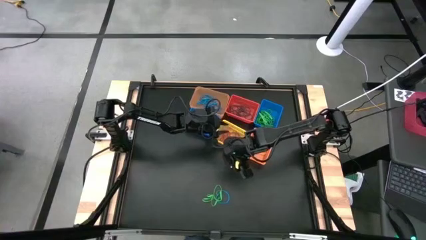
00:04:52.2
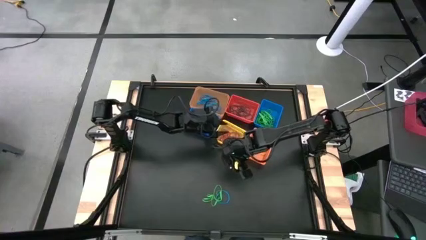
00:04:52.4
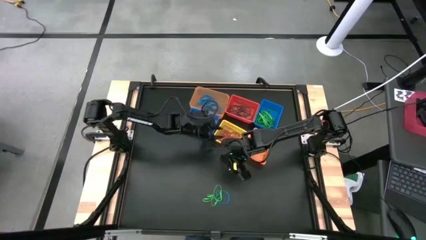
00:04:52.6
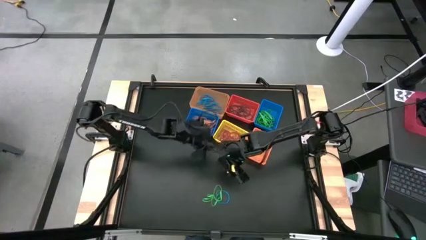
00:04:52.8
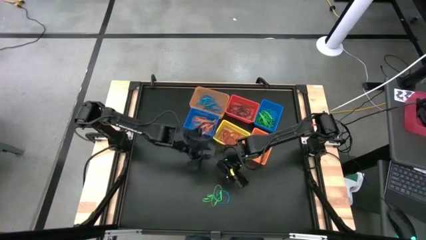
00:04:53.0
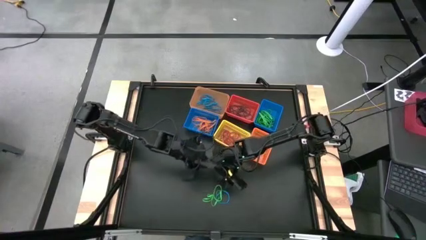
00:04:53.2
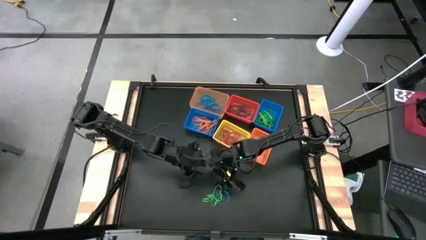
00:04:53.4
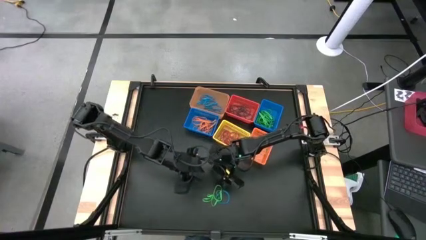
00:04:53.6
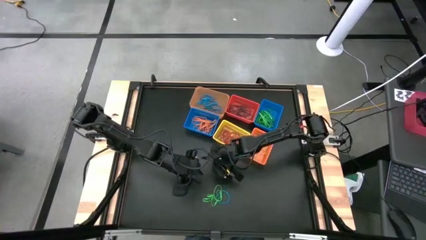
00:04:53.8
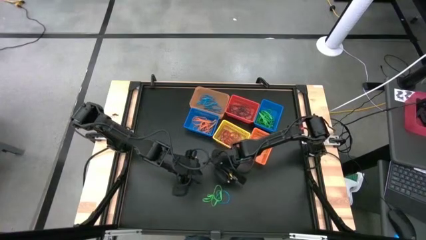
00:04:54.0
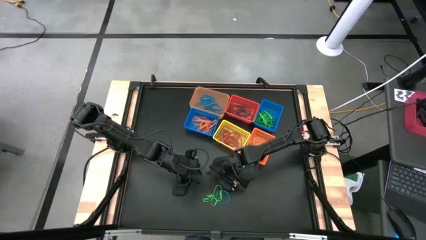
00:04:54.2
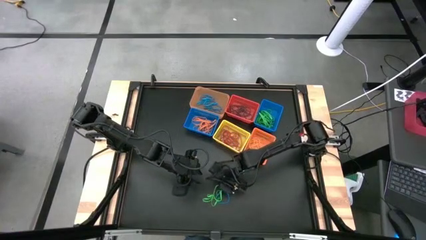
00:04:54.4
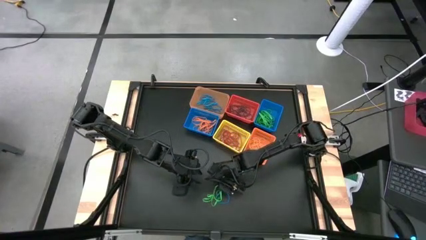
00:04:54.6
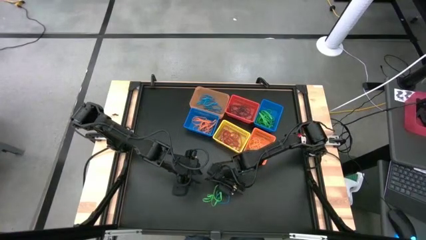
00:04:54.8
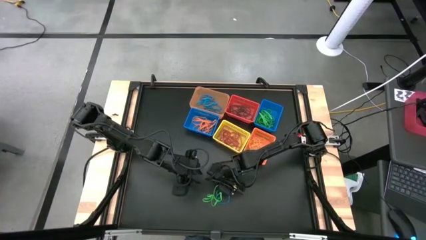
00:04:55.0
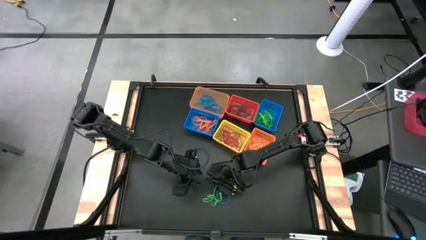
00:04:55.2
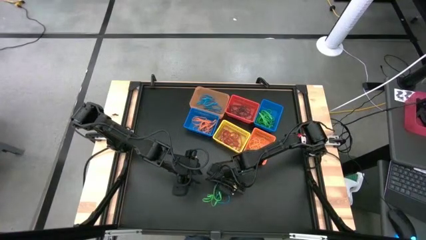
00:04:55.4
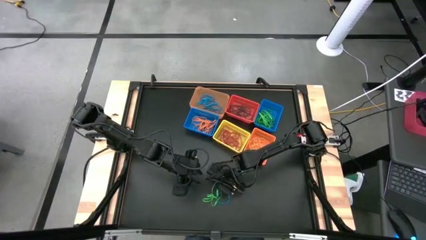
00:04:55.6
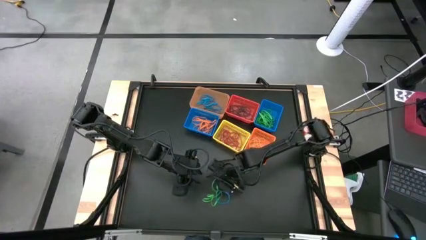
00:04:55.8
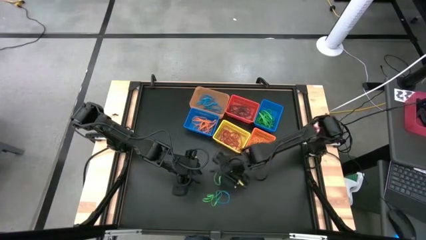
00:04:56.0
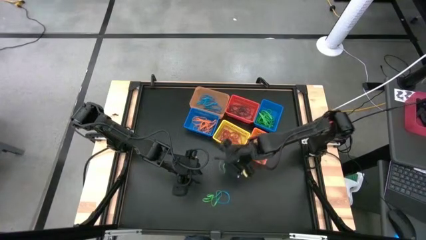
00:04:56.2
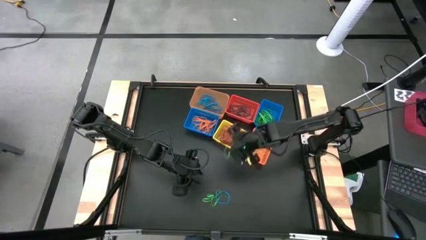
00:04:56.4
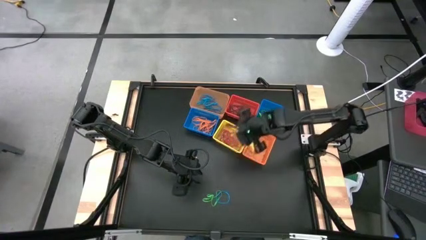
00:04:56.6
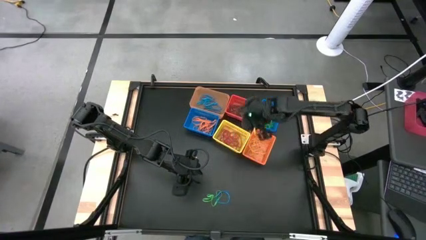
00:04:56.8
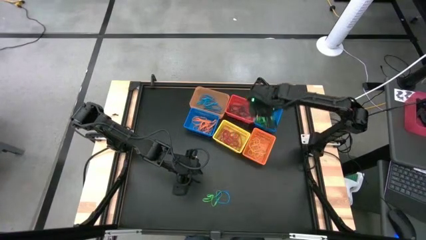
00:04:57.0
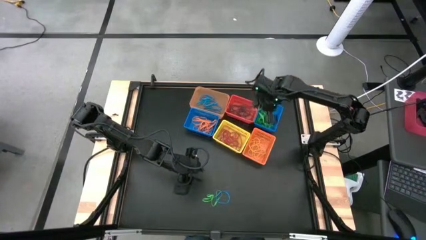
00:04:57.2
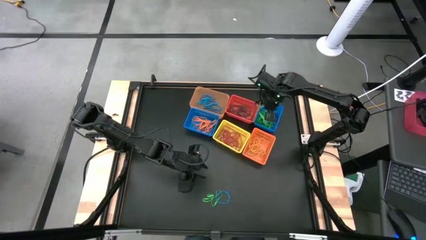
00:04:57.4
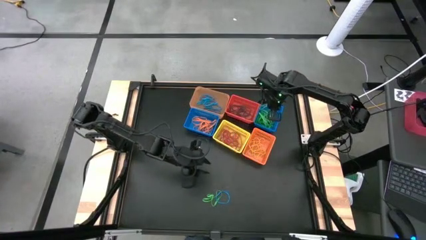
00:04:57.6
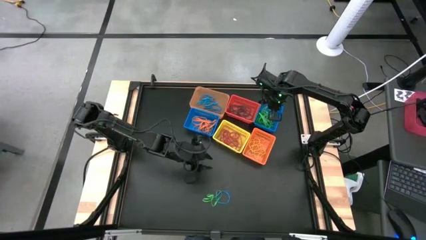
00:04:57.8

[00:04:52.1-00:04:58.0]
Task: Sort rubber bands into baskets
Put the green rubber band into the right blue basket

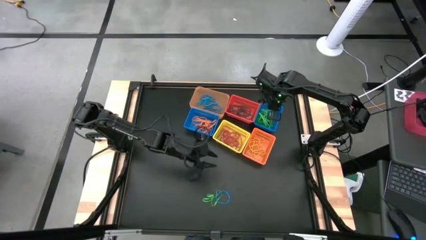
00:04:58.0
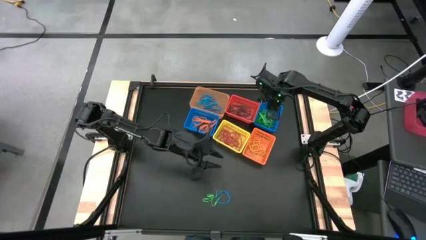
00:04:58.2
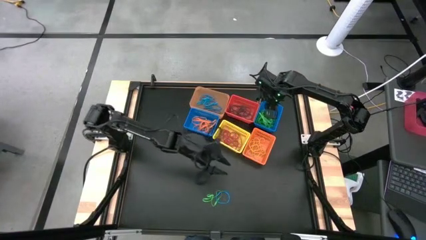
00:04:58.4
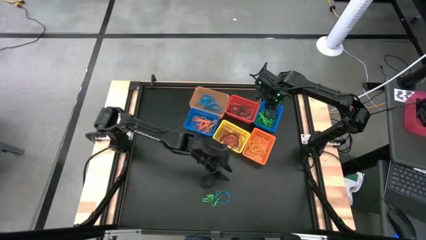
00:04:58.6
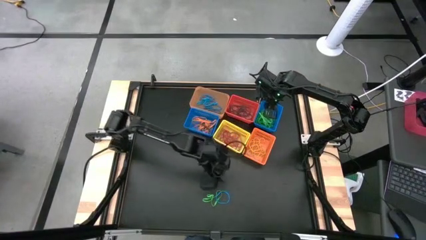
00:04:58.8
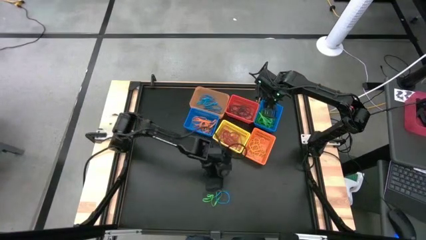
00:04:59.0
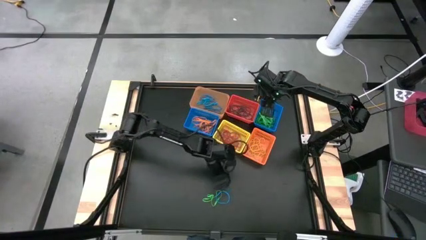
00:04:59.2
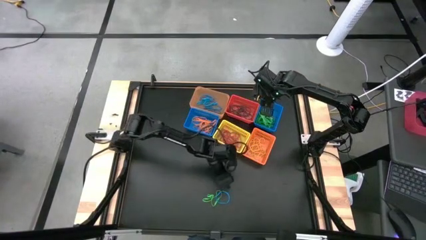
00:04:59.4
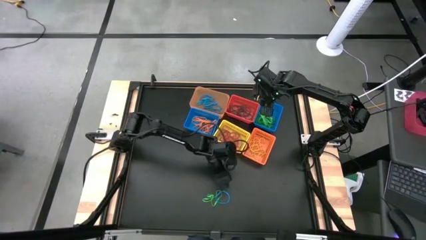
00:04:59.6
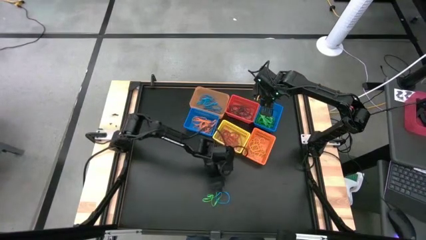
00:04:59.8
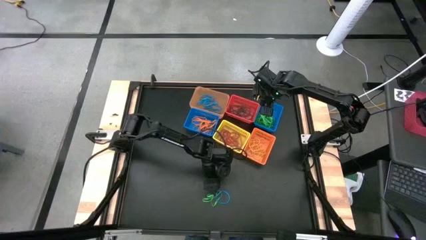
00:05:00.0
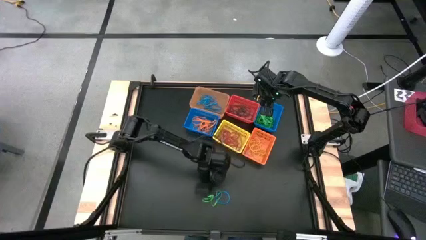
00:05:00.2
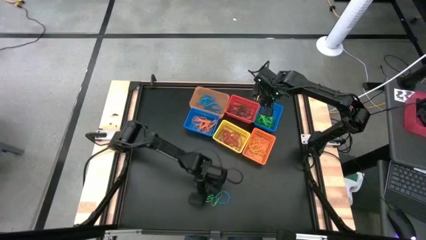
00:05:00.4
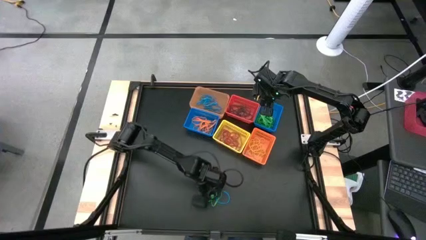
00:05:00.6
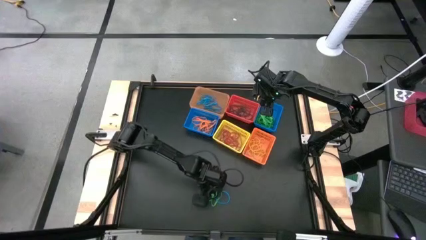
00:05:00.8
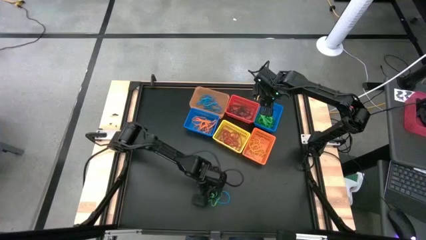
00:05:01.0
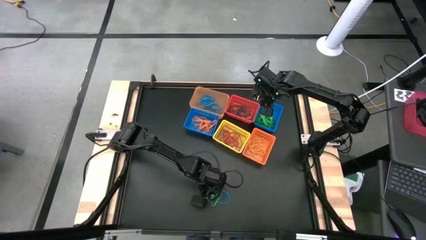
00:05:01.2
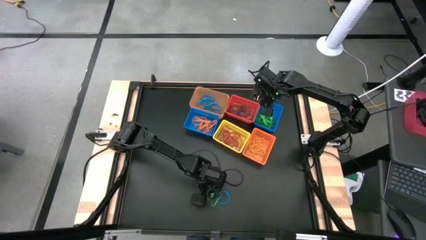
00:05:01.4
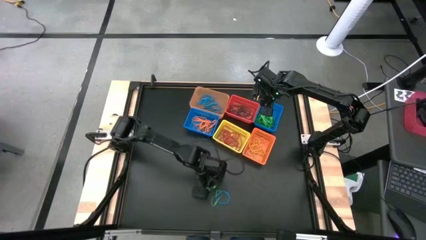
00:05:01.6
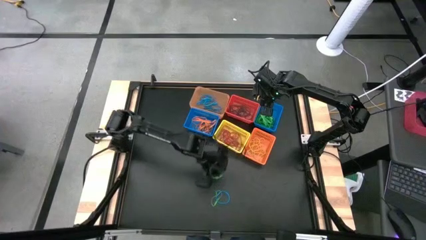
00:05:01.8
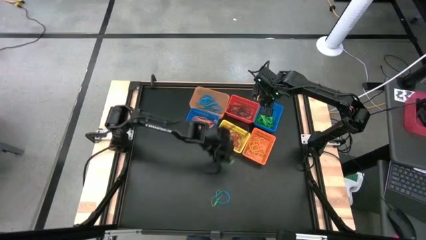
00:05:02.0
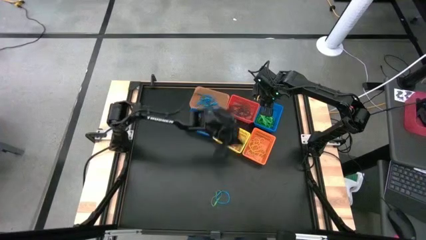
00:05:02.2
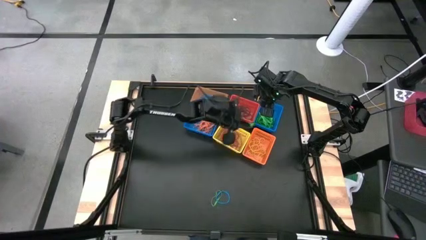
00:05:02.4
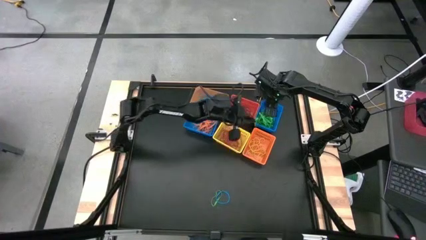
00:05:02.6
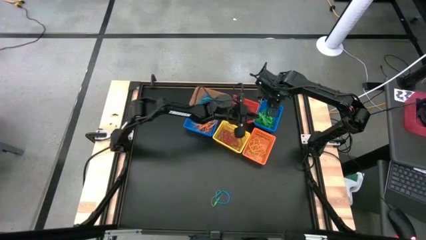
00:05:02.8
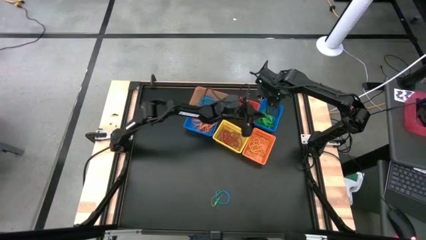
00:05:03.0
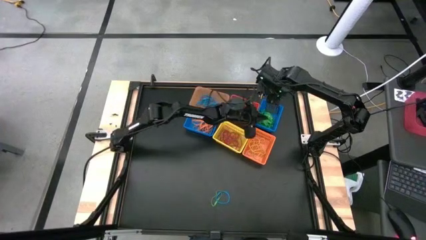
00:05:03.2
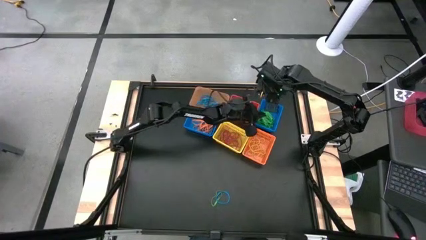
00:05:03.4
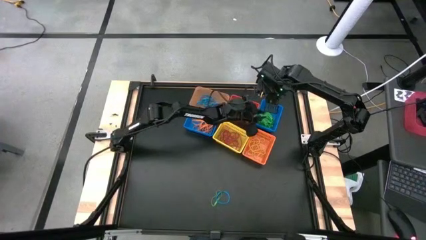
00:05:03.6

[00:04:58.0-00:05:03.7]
Put the green rubber band into the right blue basket

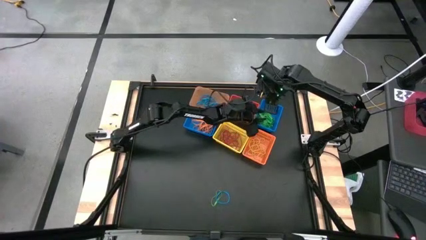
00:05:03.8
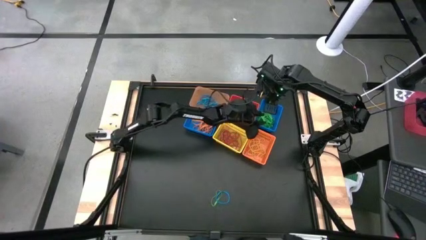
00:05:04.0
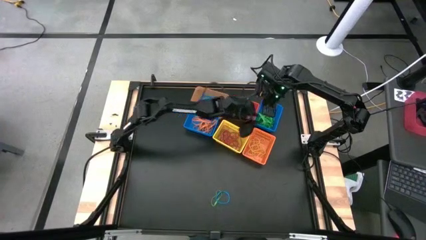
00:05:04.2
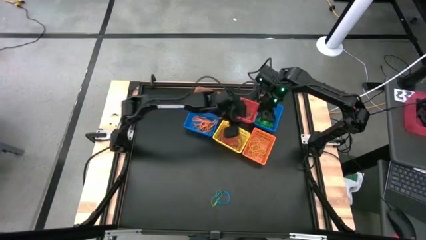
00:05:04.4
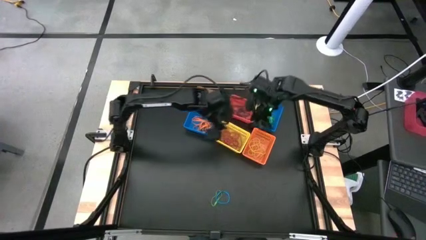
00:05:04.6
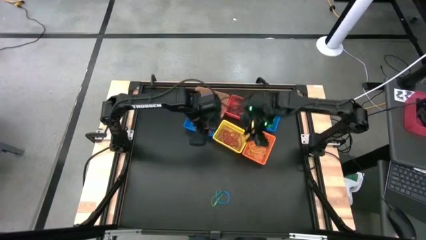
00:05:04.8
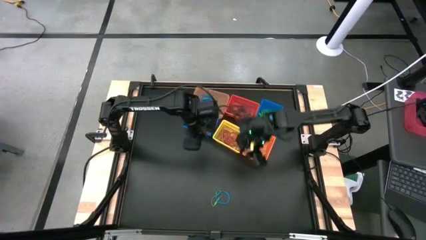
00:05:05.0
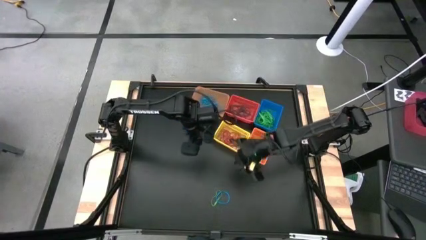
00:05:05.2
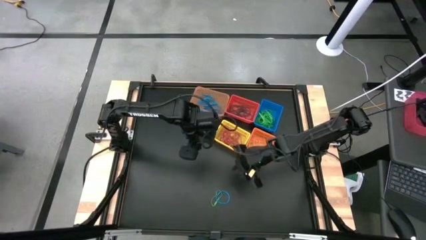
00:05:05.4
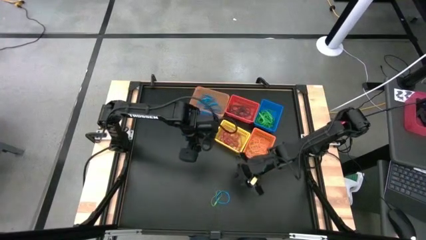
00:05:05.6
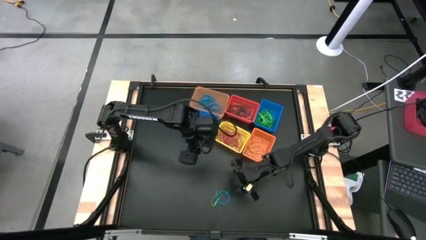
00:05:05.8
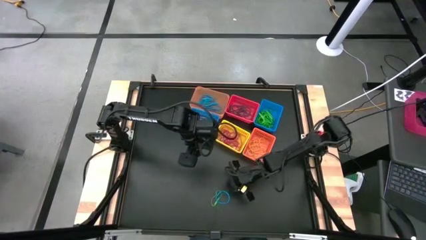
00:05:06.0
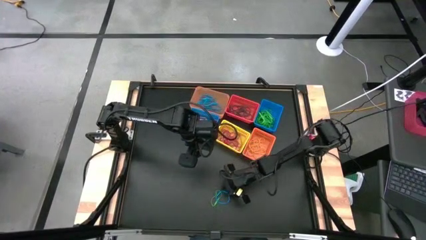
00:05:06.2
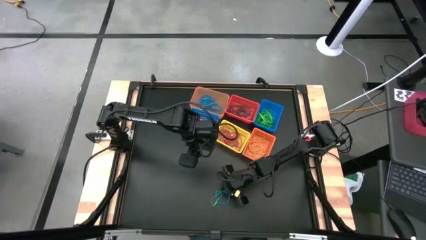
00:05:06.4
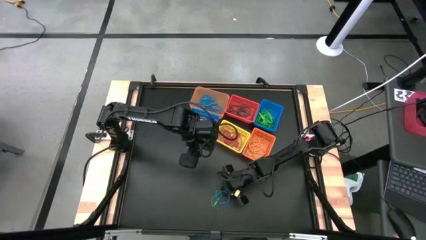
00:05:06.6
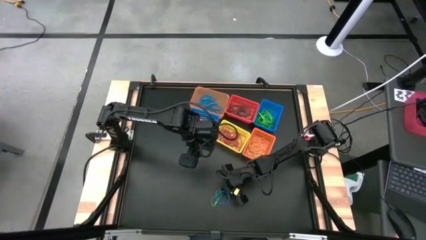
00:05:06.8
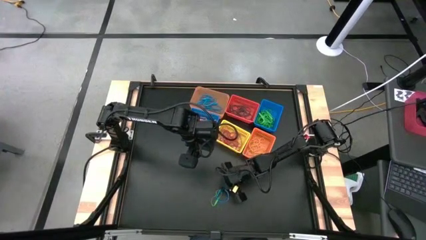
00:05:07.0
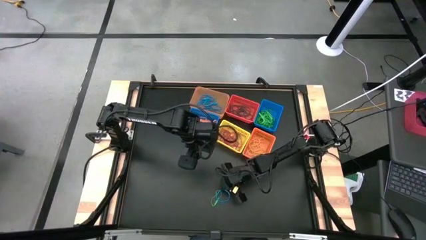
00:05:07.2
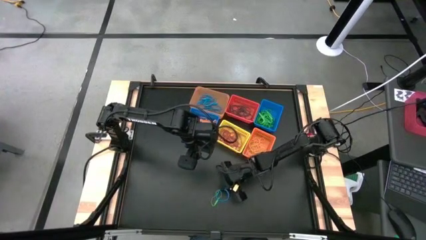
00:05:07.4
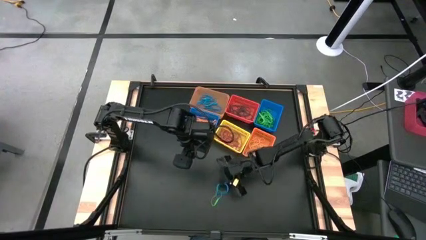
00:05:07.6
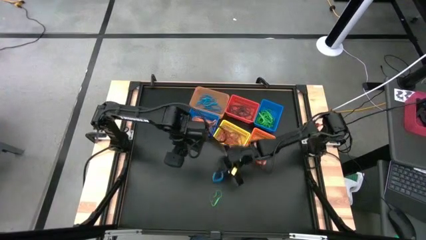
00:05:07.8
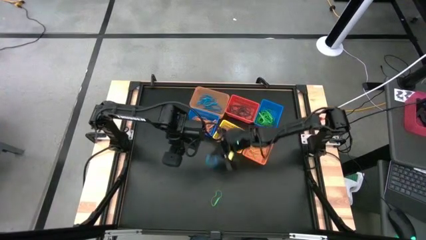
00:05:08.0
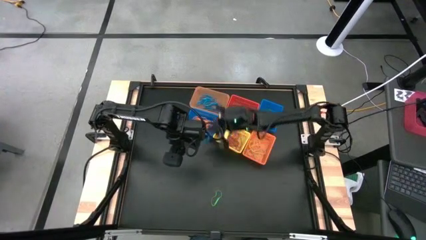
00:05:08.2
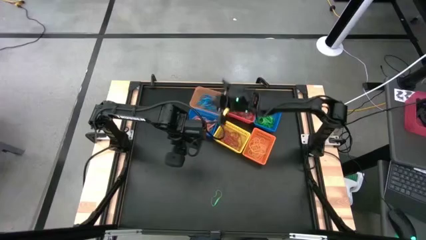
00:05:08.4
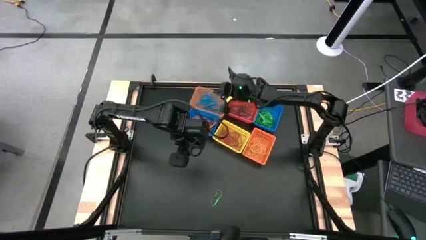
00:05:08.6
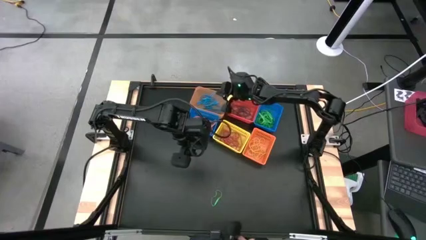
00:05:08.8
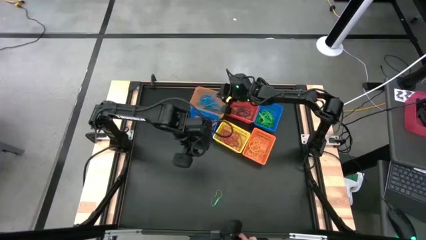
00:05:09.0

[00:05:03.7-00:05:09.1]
Put the blue rubber band into the transparent orange basket
